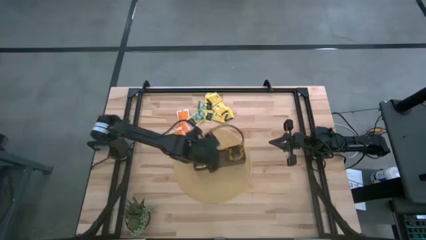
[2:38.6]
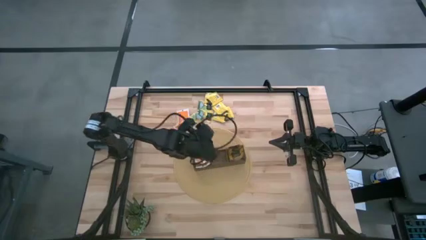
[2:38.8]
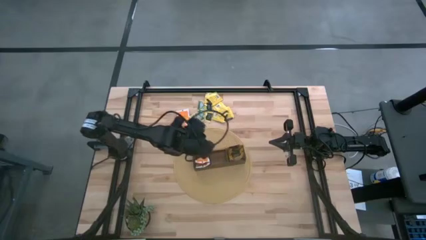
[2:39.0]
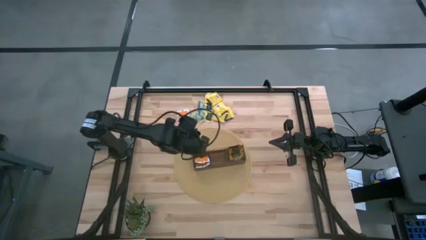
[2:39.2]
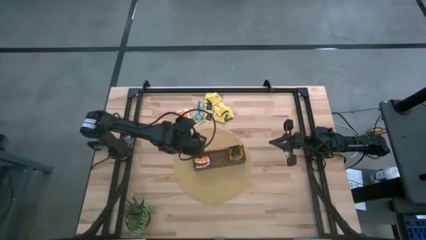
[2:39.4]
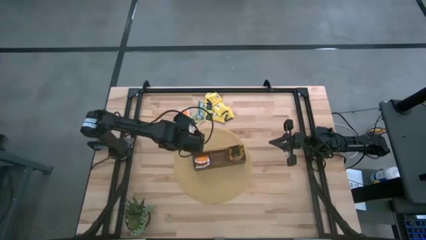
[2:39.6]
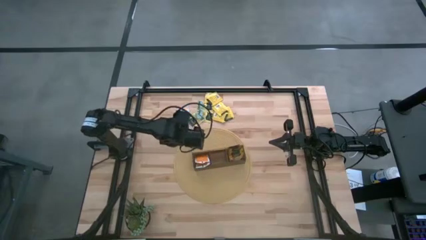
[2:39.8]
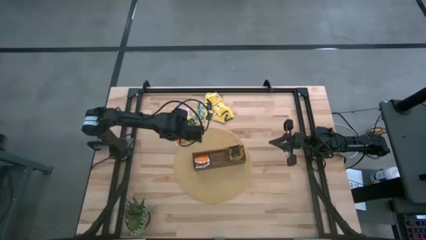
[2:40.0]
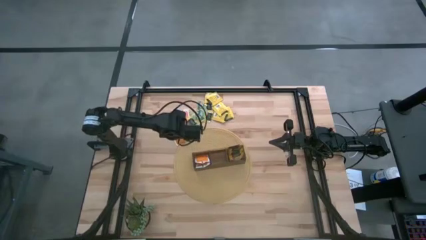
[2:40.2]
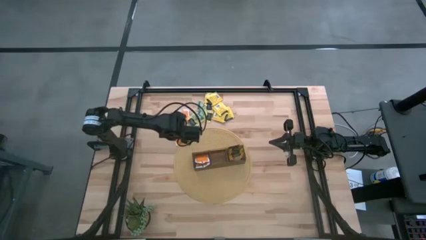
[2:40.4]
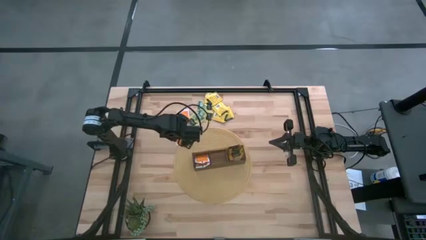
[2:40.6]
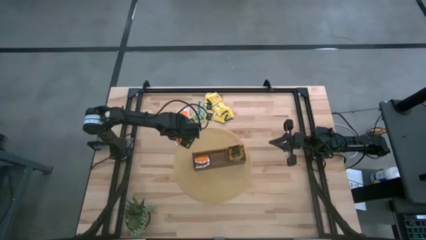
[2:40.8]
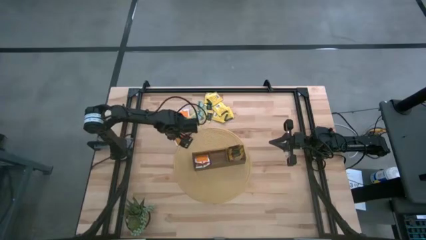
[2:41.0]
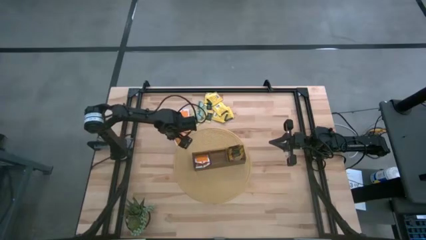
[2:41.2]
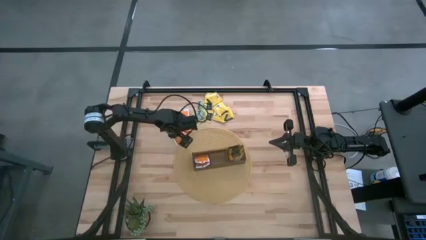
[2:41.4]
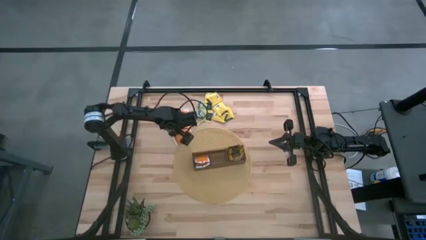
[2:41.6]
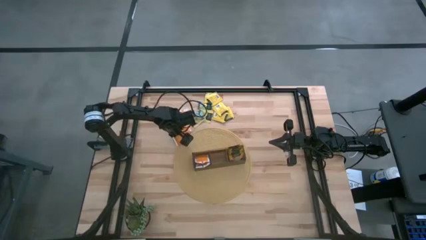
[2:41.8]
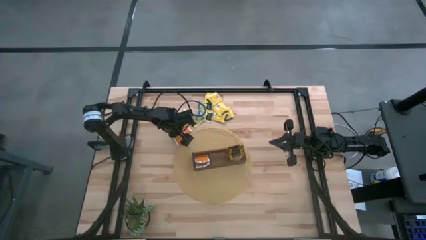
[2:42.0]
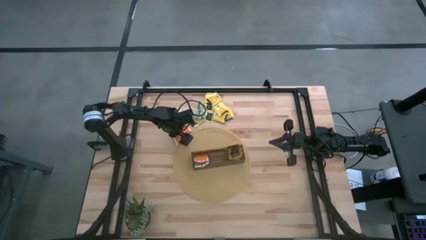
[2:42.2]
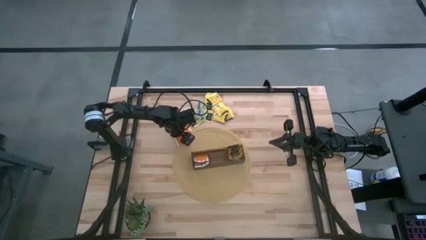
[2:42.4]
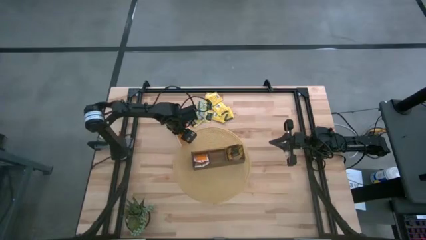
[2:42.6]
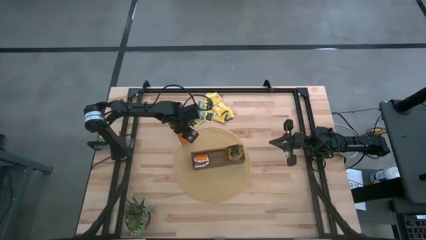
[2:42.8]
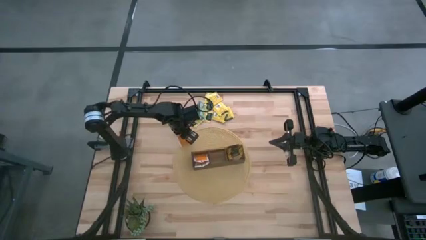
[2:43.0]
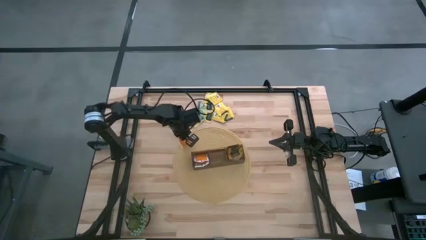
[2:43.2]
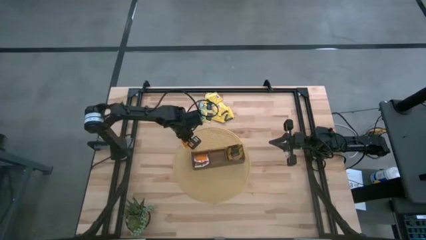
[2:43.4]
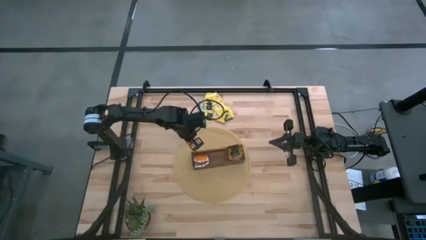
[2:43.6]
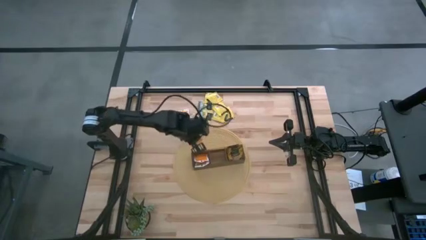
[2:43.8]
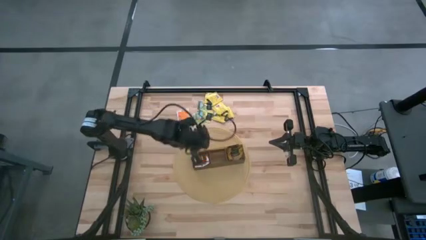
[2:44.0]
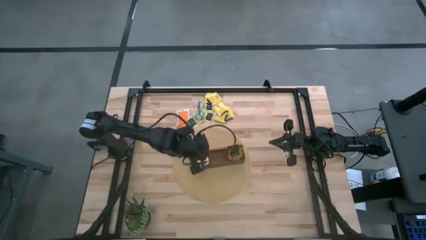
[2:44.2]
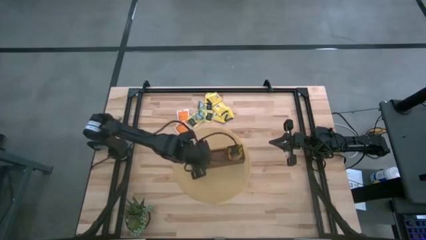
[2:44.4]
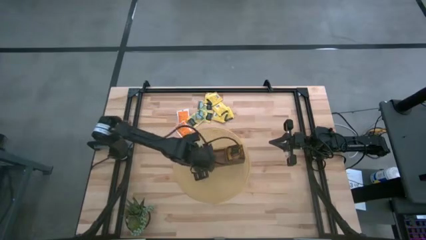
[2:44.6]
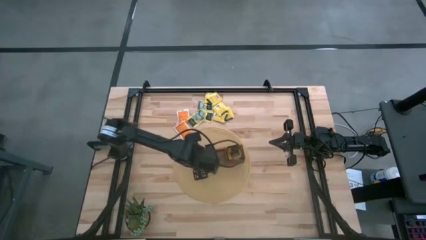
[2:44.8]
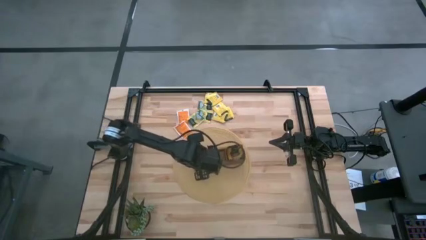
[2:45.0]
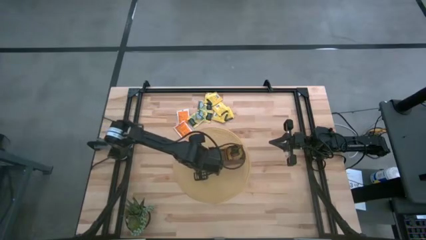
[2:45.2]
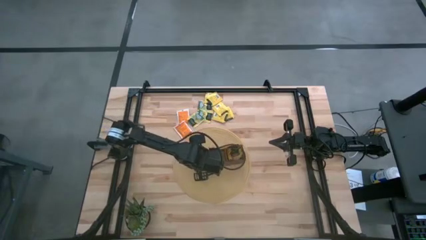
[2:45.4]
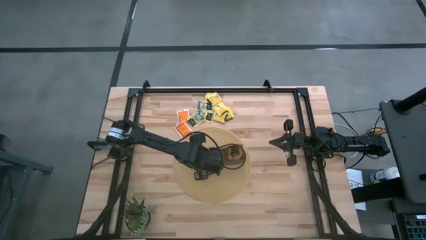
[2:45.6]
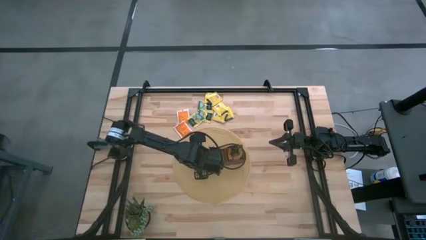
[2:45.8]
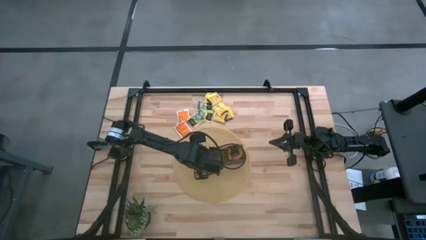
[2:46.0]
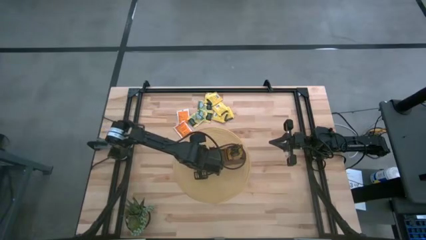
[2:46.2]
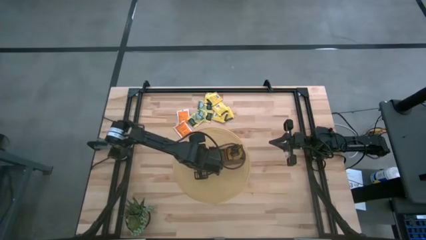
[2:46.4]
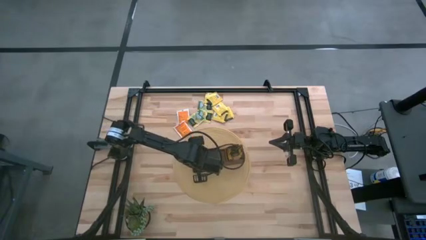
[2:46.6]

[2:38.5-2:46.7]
Task: Pick & Place Tea
Put the white and orange tea bag into the wooden organizer

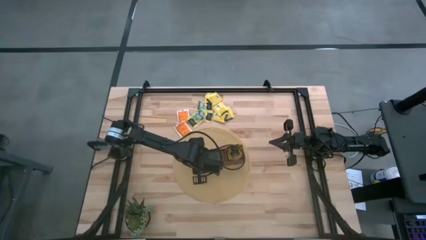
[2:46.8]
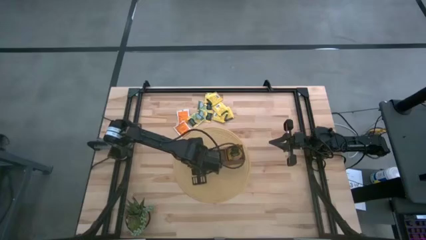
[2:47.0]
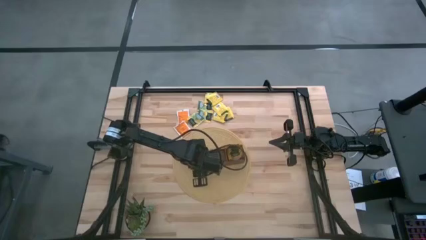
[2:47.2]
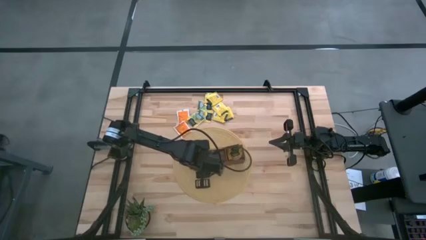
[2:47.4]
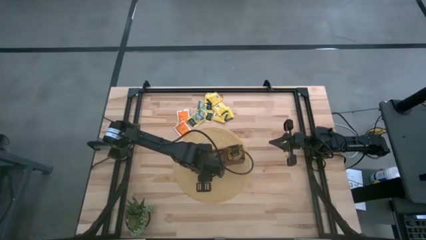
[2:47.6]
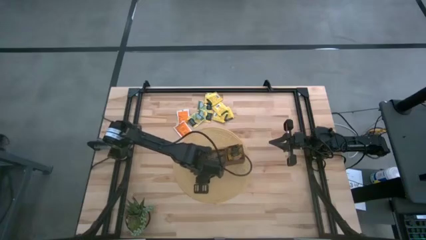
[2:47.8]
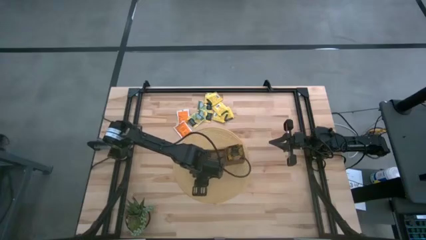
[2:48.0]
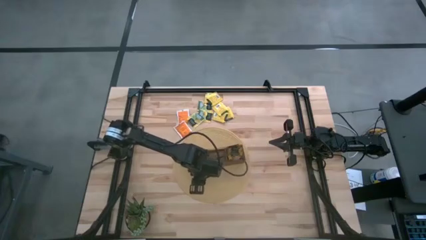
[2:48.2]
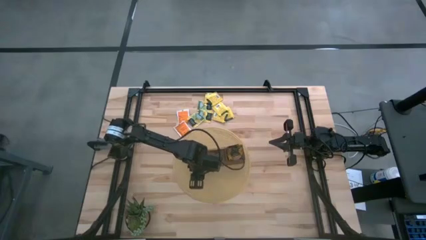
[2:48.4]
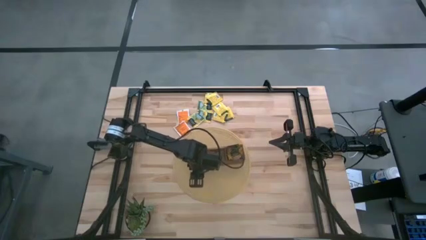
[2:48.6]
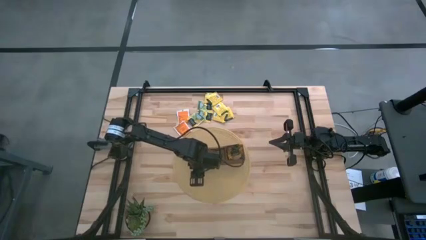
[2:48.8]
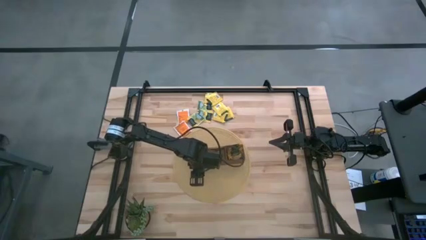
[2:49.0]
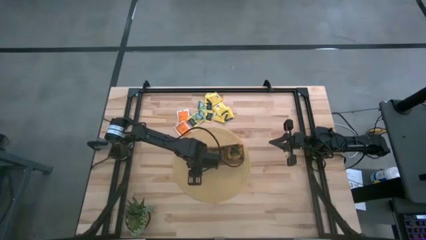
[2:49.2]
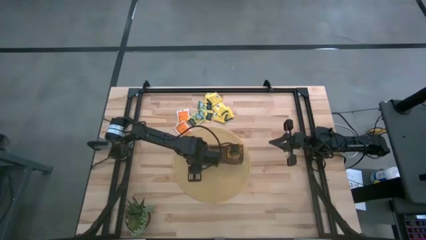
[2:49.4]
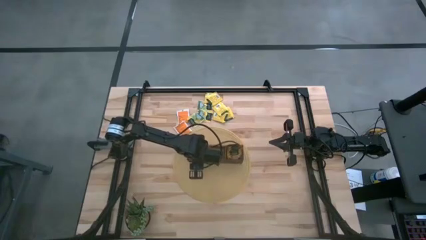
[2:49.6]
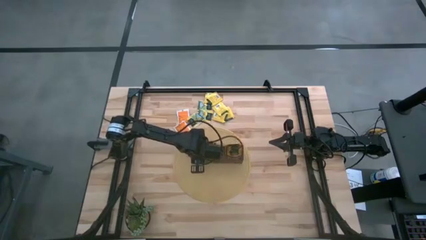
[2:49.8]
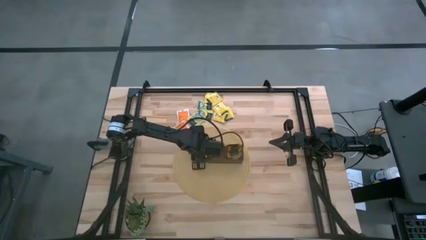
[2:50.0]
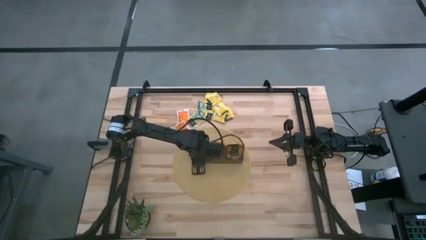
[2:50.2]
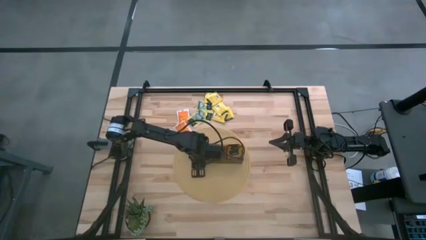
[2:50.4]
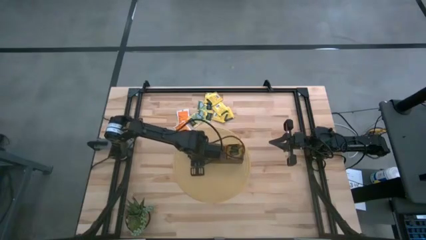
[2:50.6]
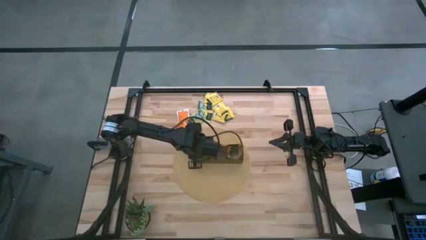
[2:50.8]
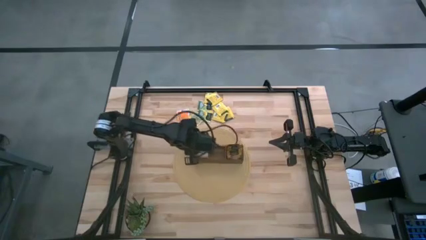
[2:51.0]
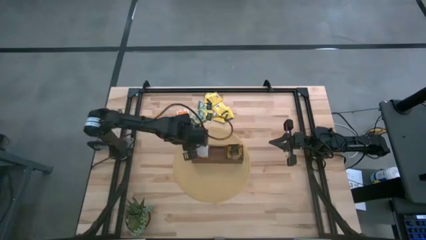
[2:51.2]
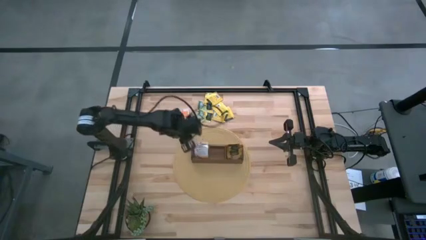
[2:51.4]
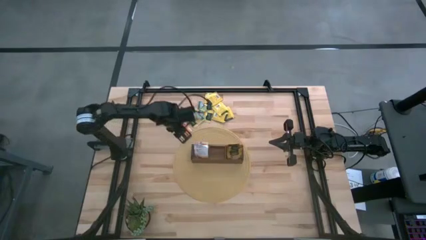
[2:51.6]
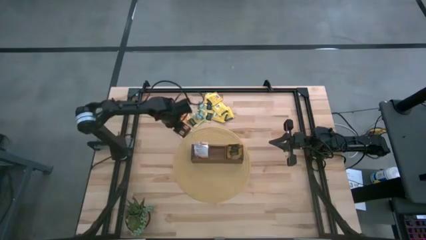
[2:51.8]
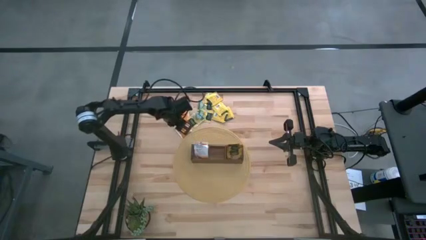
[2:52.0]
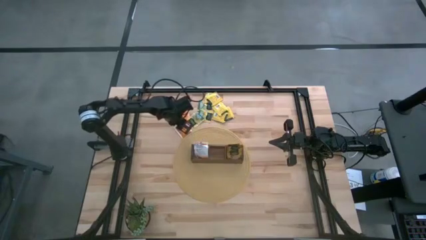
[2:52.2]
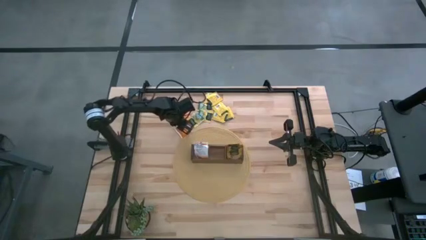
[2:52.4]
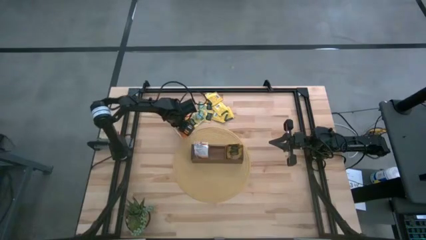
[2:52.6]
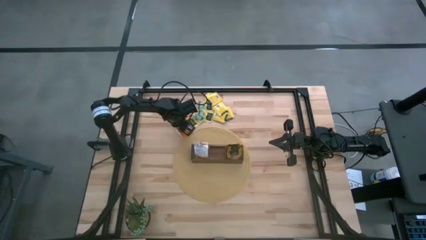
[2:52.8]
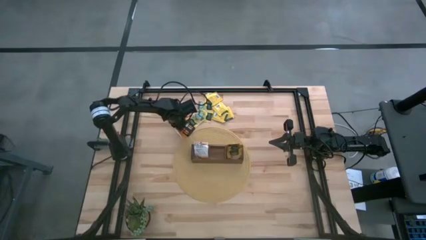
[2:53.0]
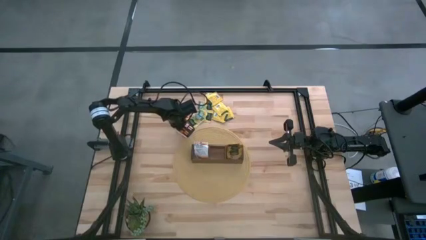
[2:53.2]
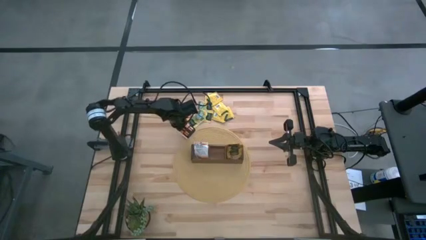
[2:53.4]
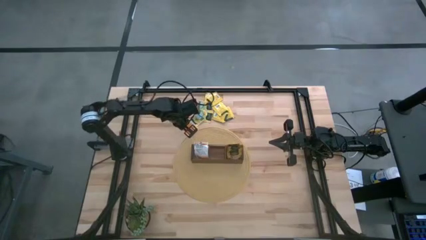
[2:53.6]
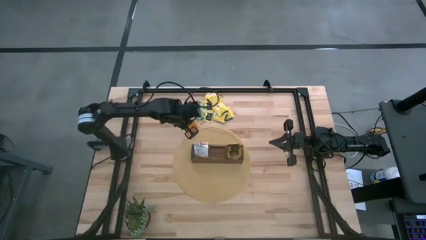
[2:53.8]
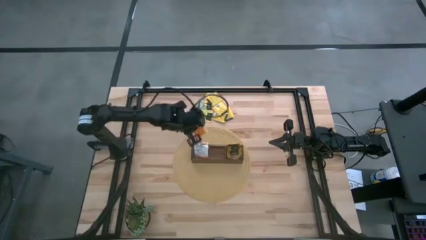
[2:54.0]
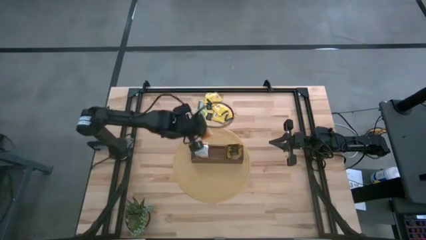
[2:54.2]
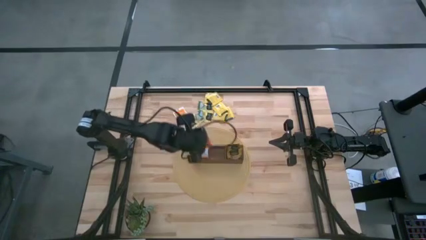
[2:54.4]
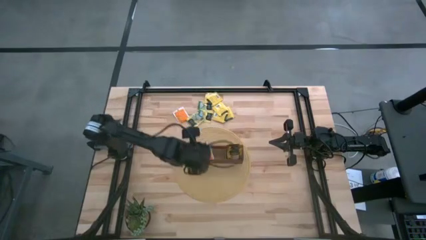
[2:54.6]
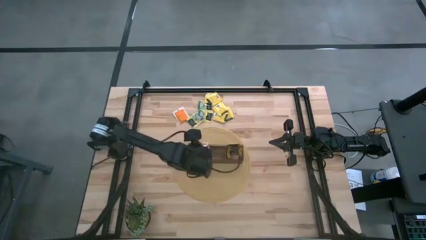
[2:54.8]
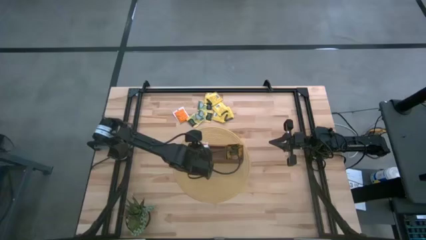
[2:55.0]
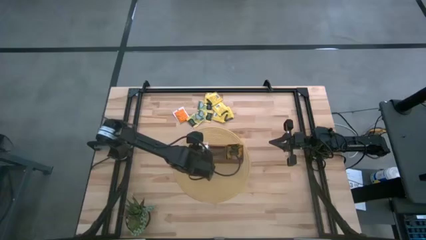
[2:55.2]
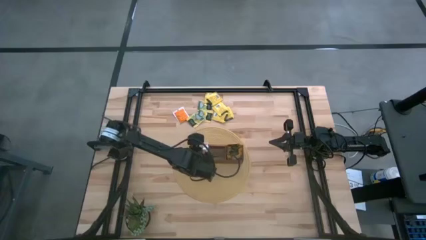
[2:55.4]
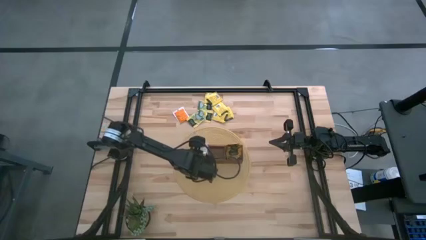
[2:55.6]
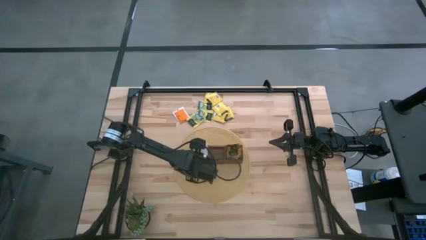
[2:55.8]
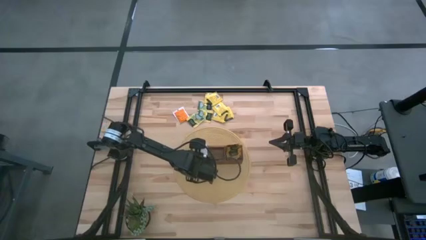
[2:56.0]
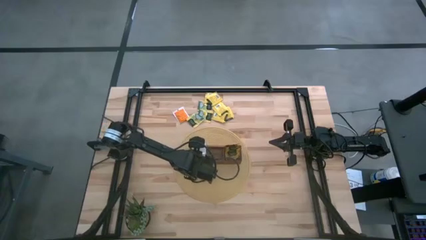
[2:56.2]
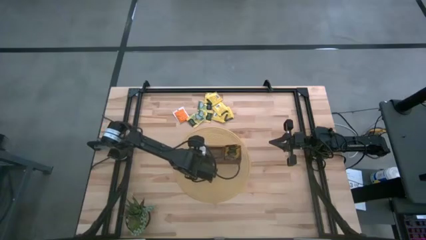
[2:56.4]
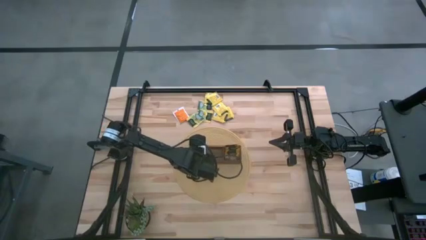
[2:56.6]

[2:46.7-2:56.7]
Put the white and orange tea bag into the wooden organizer
